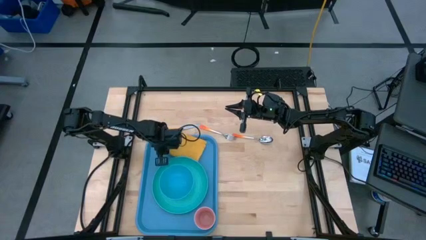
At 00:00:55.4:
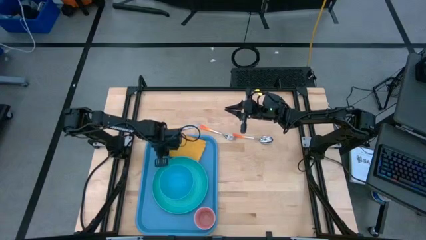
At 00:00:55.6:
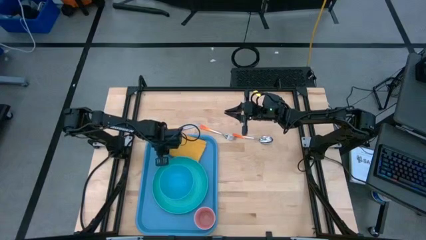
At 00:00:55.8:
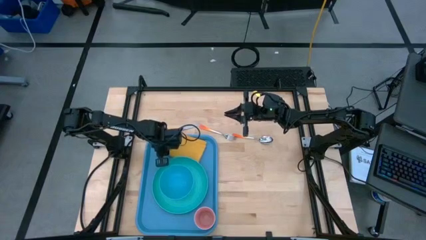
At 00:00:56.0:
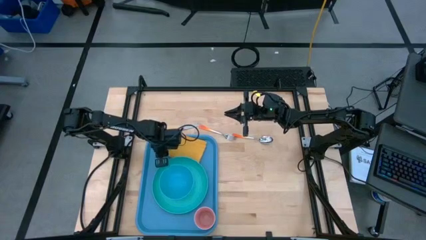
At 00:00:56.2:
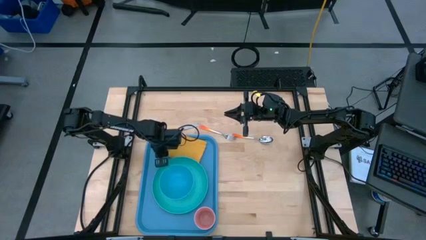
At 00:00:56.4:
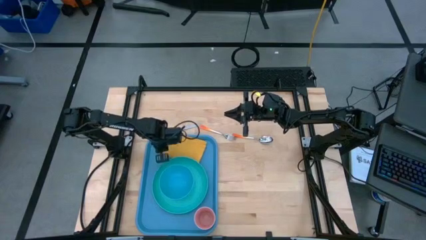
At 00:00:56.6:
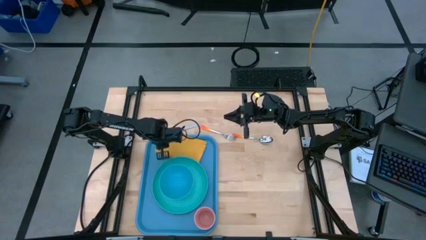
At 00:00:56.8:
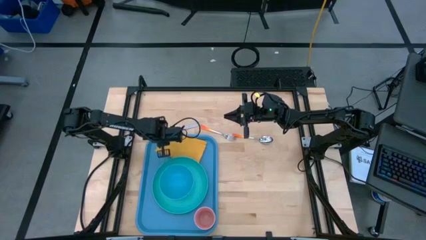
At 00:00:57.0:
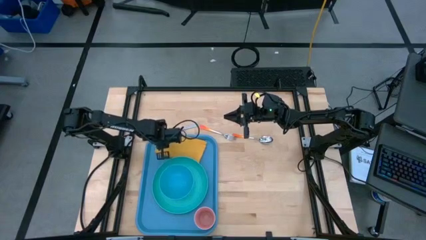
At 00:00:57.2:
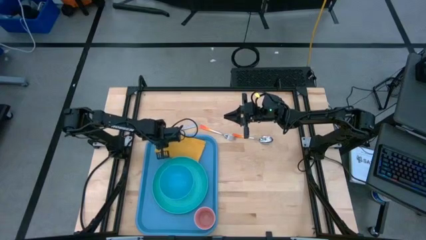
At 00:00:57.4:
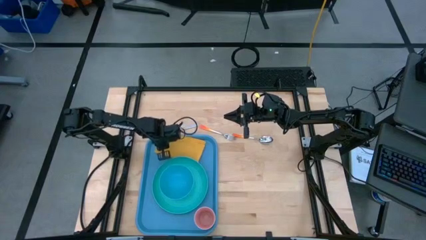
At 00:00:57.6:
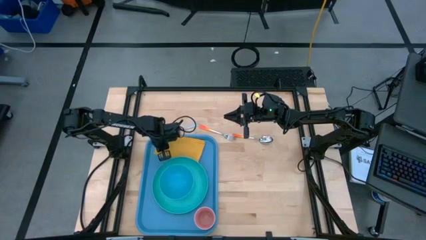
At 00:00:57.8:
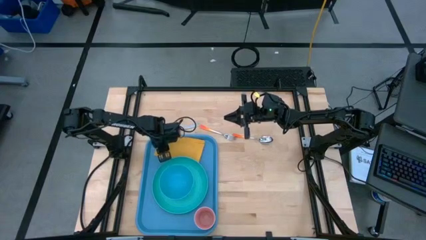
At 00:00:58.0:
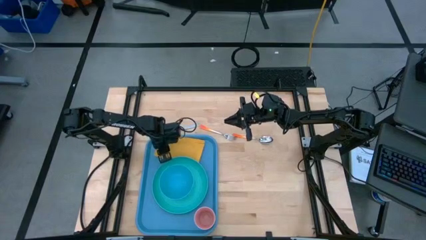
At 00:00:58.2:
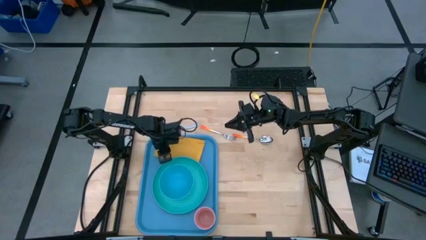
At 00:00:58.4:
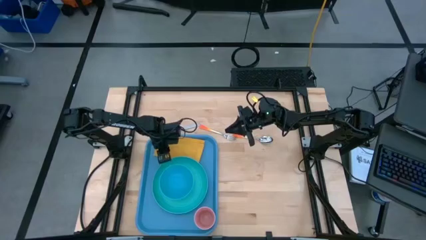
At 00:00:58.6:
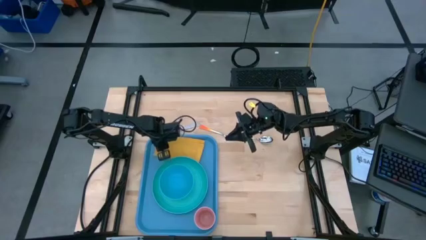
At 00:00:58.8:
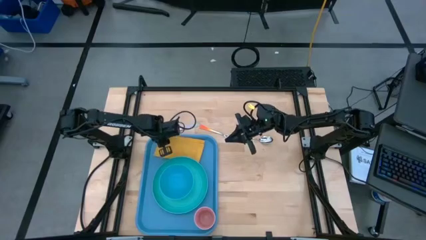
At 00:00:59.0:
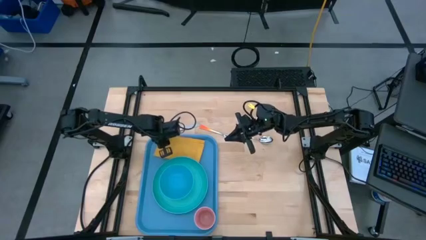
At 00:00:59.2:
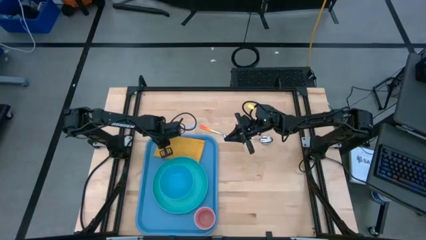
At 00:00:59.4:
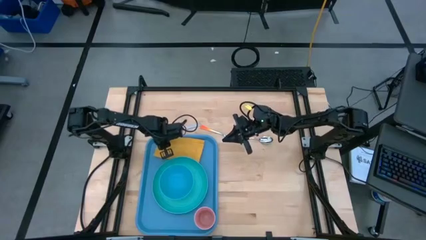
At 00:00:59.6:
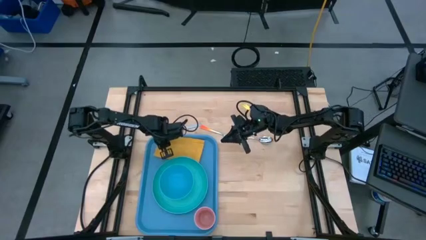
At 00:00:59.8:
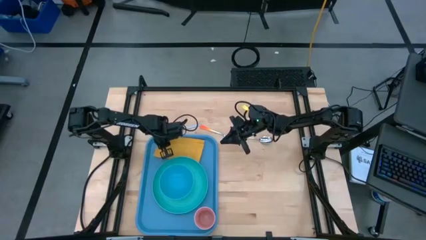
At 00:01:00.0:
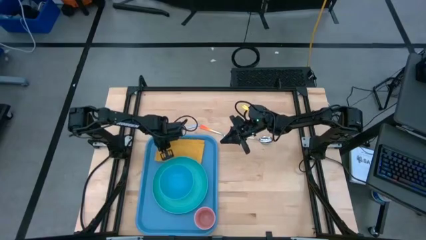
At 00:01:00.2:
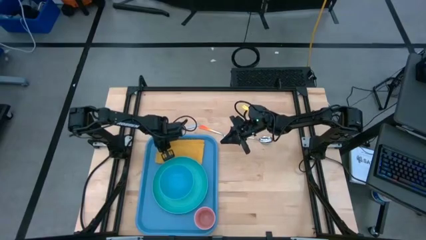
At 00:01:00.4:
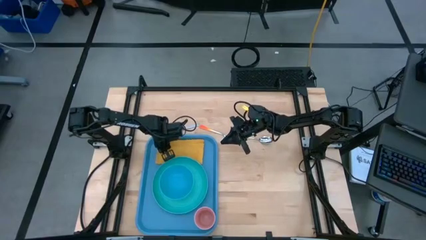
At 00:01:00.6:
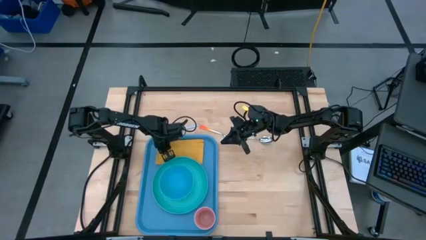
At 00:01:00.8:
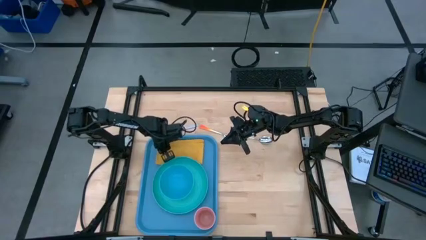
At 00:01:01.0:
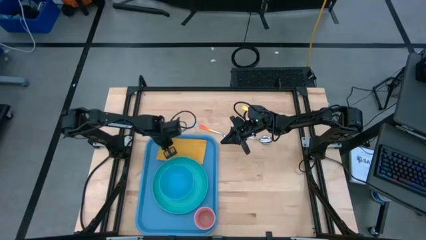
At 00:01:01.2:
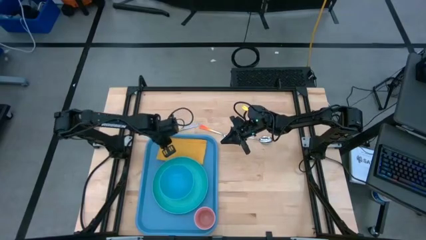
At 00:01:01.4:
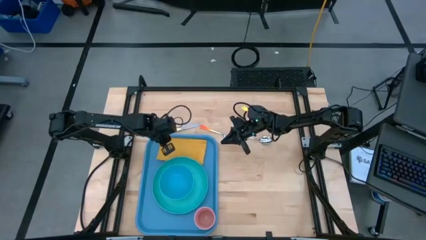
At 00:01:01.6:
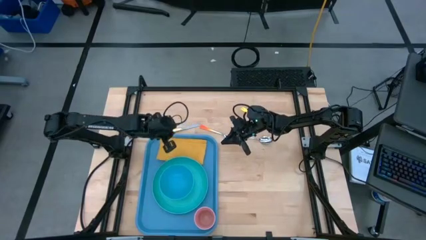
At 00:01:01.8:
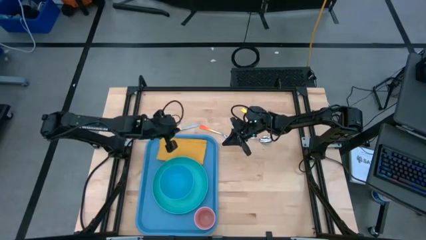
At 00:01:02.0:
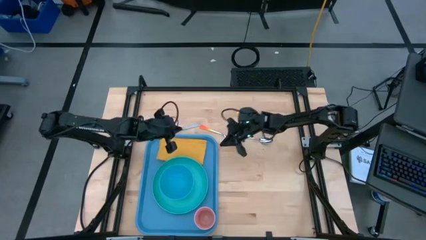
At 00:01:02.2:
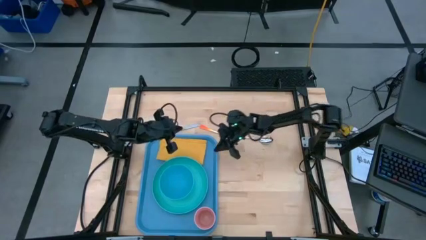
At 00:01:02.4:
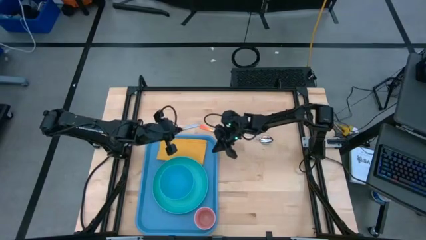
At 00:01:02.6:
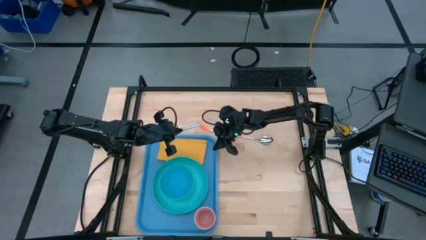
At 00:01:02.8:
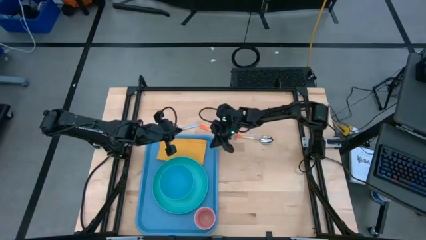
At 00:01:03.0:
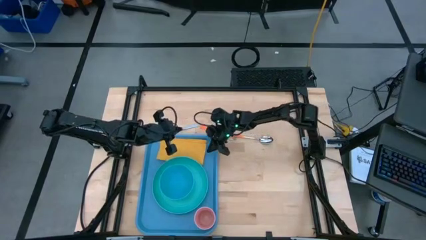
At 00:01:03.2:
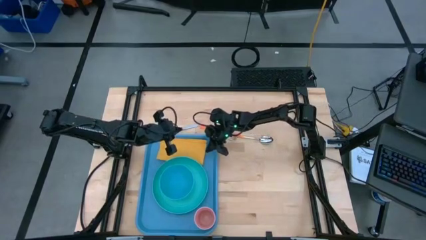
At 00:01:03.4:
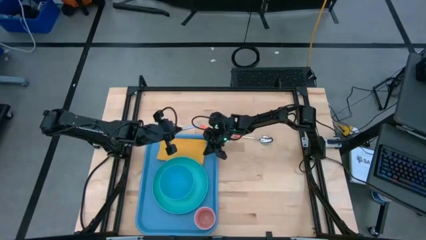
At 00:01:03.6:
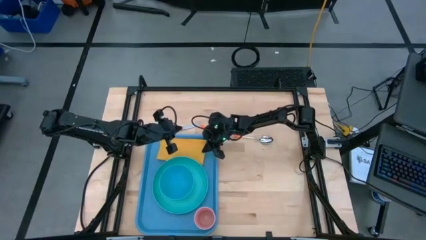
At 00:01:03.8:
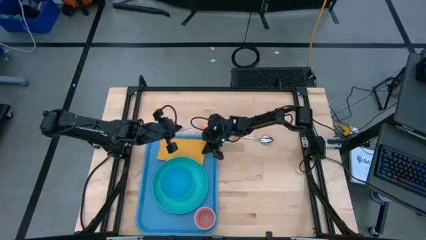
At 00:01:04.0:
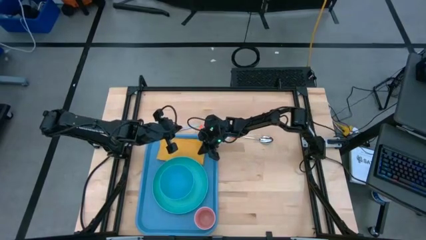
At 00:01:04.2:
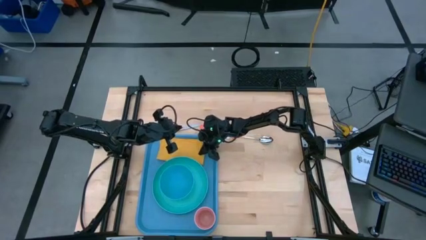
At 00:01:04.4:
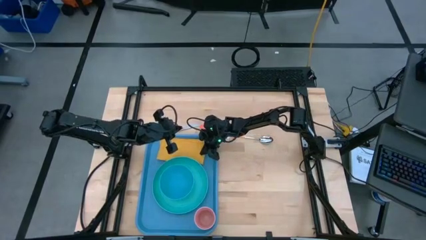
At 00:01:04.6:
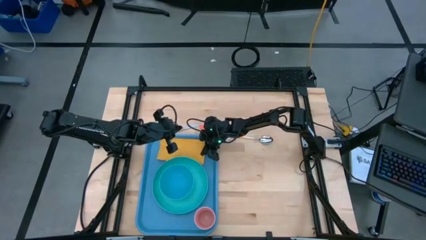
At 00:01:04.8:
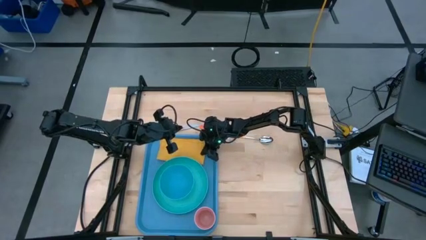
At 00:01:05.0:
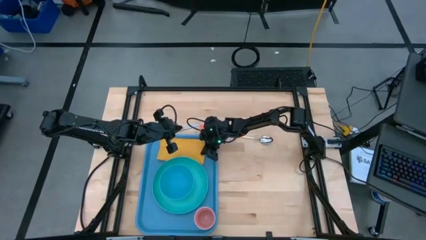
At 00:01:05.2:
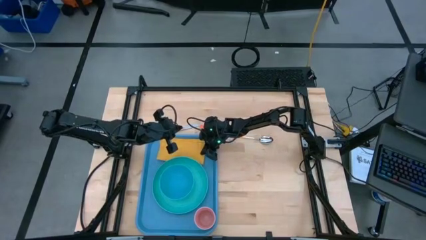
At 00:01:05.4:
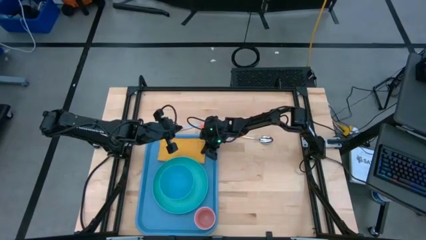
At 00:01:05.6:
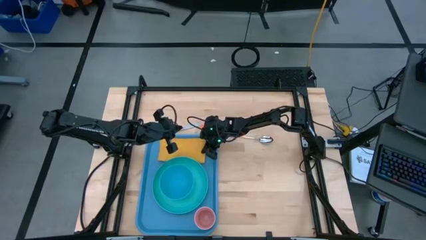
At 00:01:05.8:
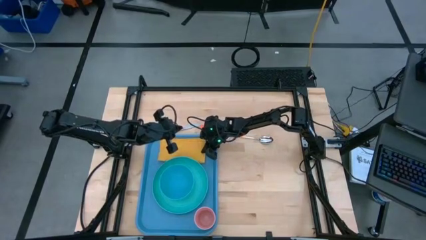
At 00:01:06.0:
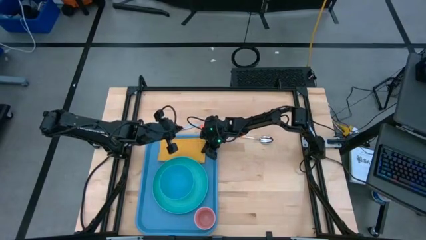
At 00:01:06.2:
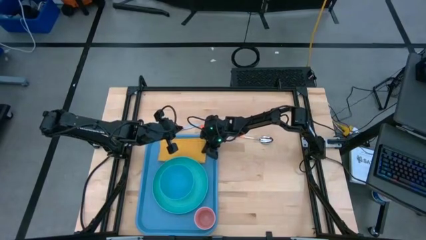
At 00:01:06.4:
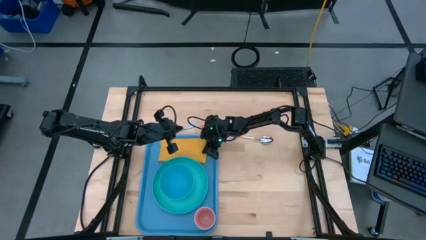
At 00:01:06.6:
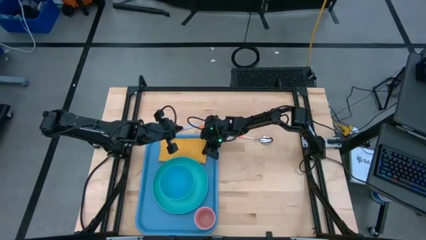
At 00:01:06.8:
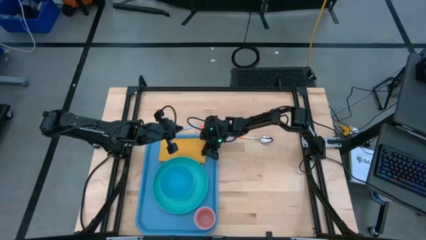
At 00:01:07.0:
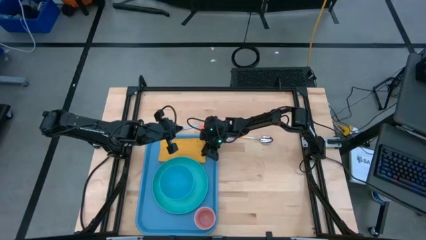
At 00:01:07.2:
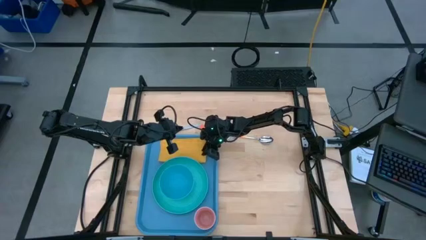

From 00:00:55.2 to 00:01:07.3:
Task: Set up tray
Put the yellow napkin to the top of the green plate on the blue serving tray
